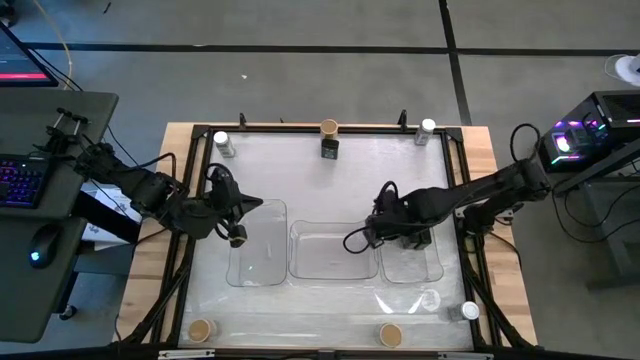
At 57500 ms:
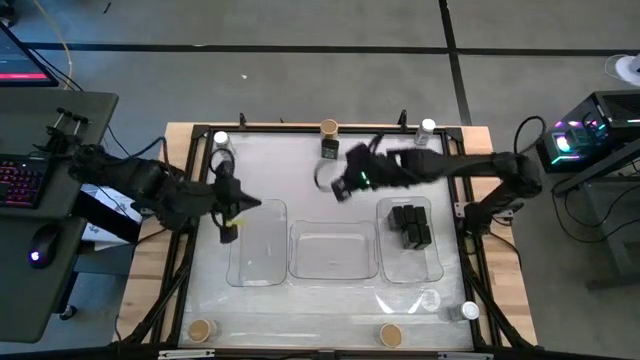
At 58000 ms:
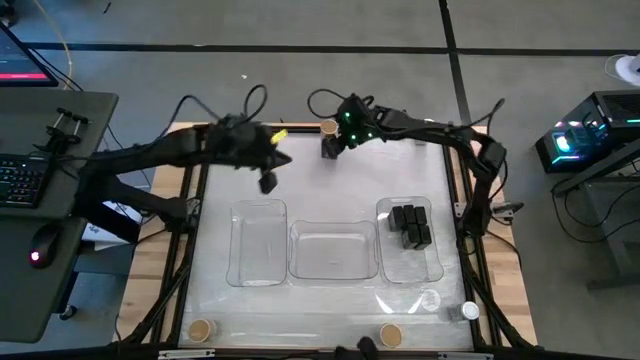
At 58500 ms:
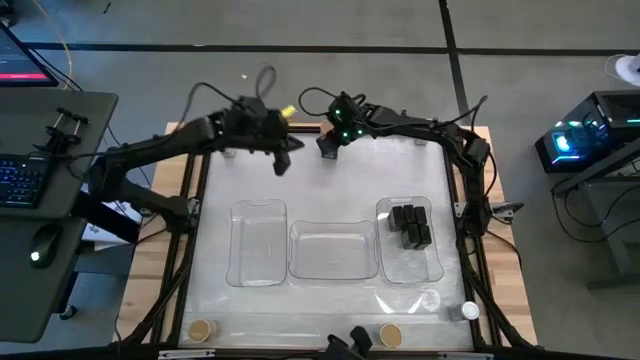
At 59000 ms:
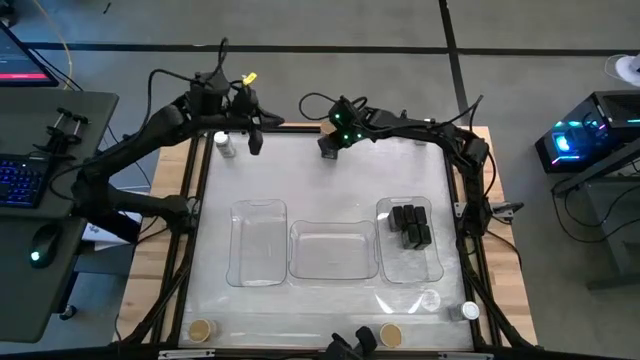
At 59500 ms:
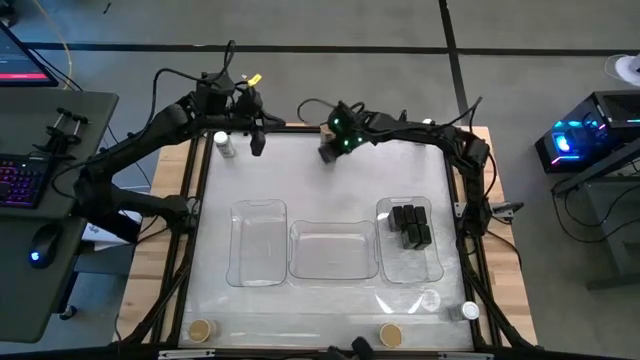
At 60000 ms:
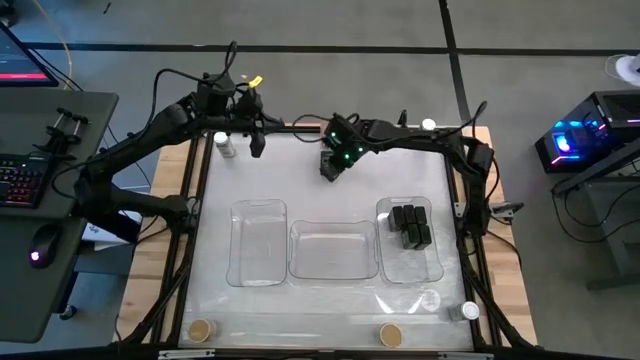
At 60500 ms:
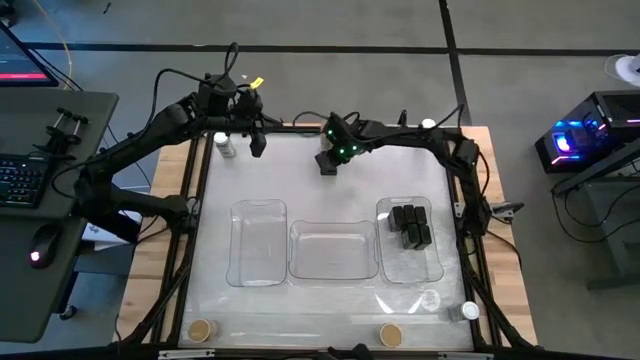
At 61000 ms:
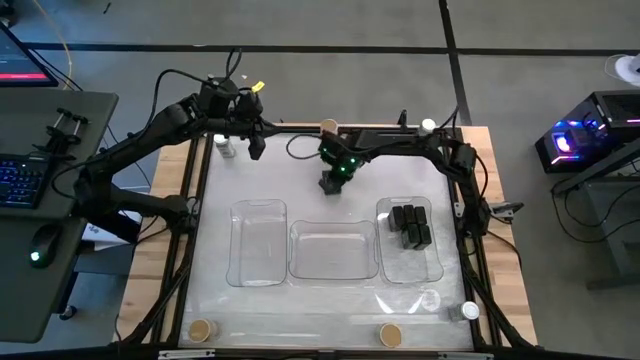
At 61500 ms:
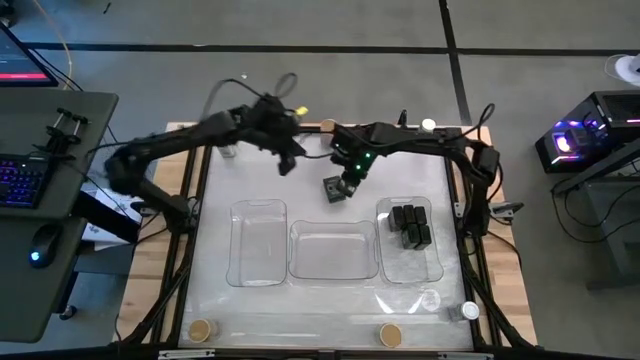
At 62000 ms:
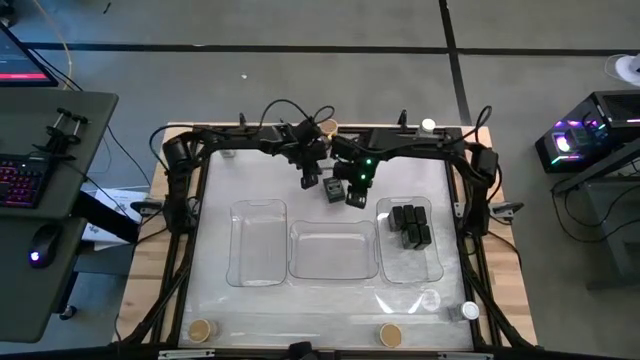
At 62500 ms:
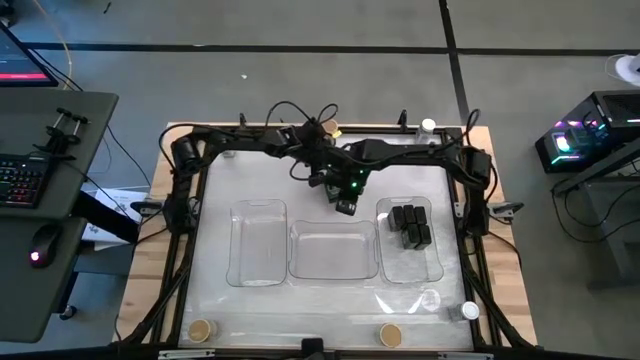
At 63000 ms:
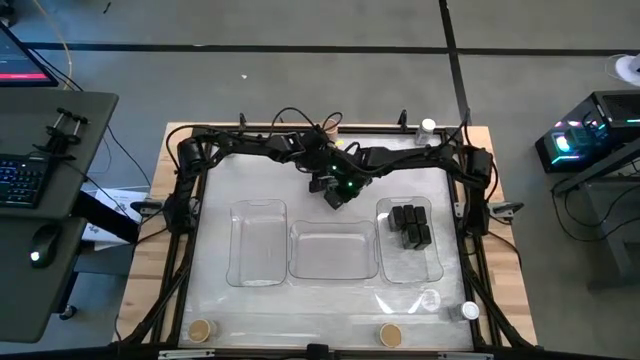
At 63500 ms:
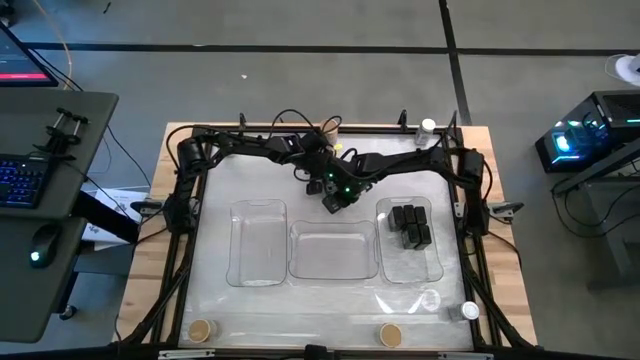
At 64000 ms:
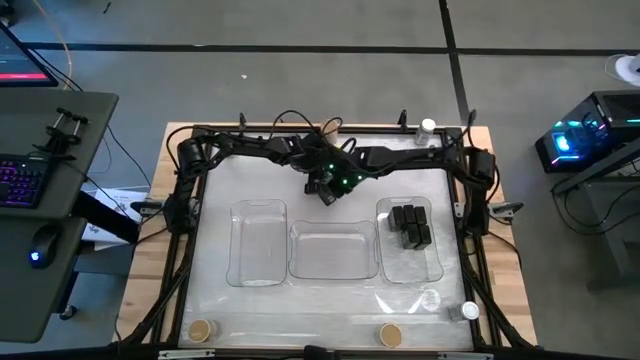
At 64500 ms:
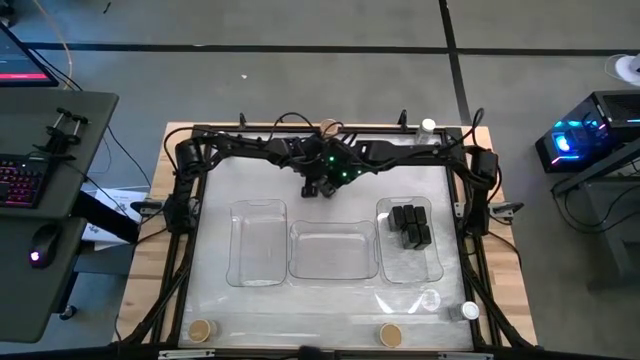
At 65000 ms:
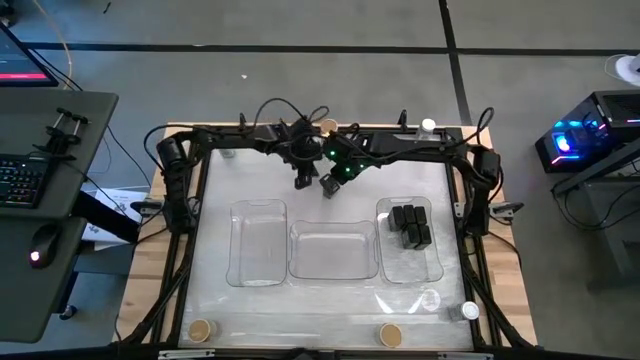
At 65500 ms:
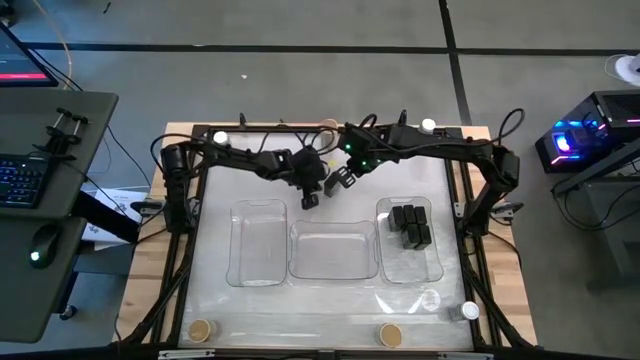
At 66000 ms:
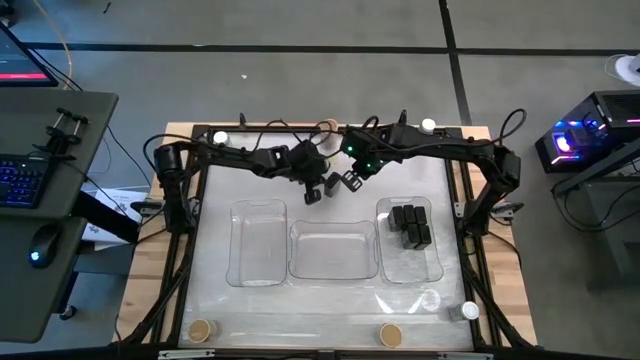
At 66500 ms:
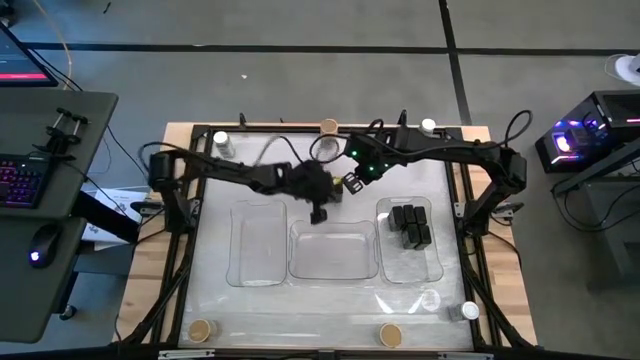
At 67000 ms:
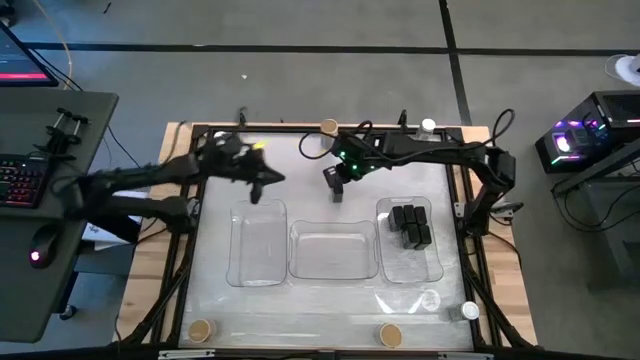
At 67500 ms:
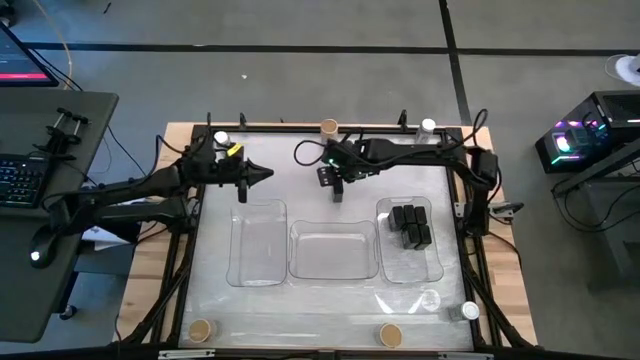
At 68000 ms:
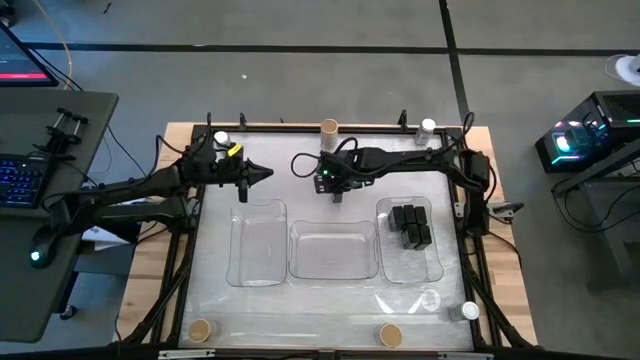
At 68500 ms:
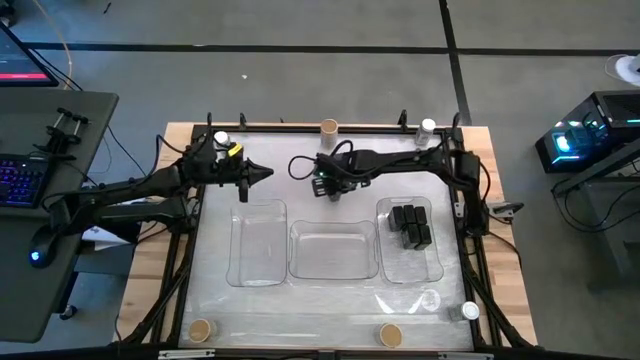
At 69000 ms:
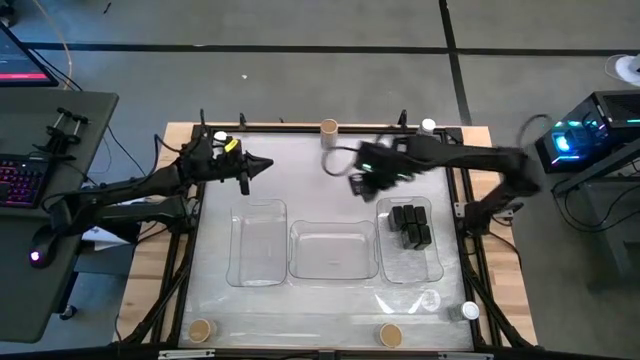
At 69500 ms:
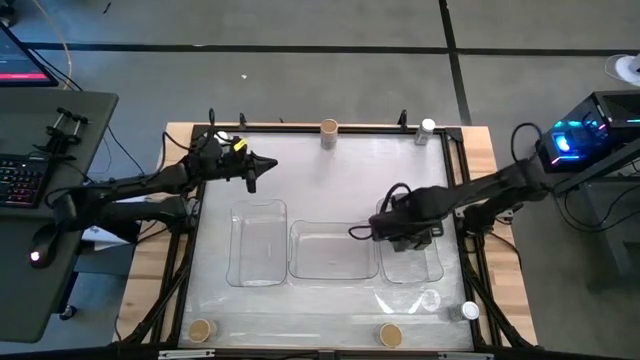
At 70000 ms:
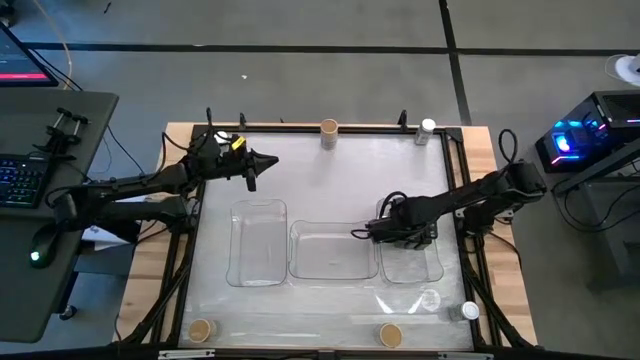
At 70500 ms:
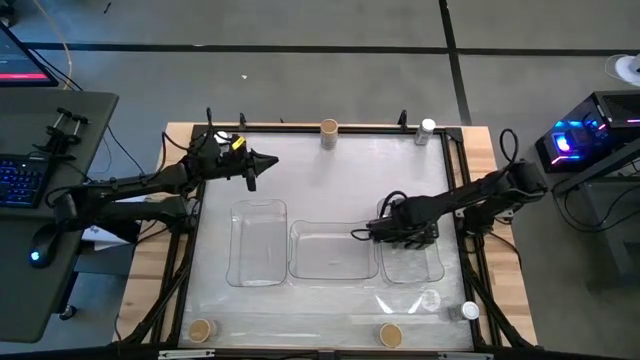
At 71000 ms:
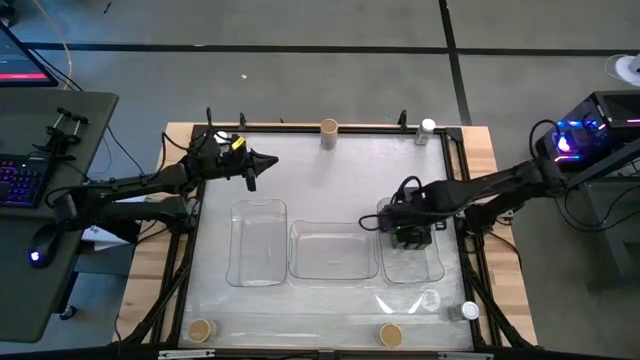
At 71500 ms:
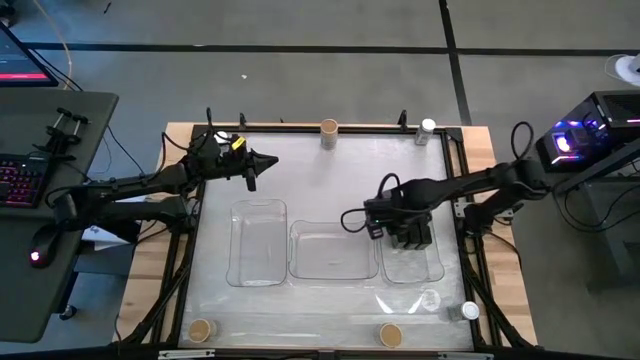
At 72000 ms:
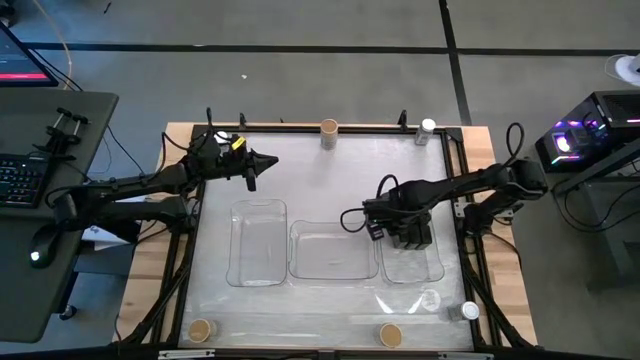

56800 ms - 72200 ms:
Task: Sort spices by type
Put the black seasoning can into the right transparent bin aligned with the other black seasoning cans

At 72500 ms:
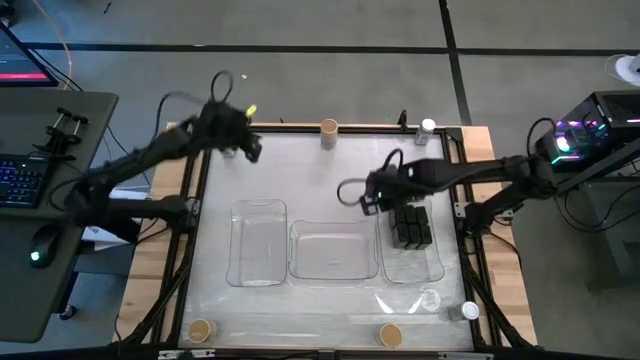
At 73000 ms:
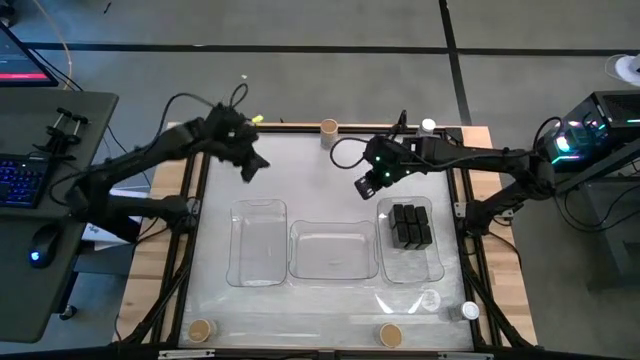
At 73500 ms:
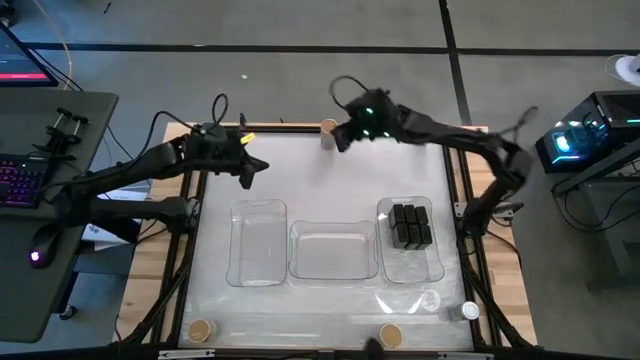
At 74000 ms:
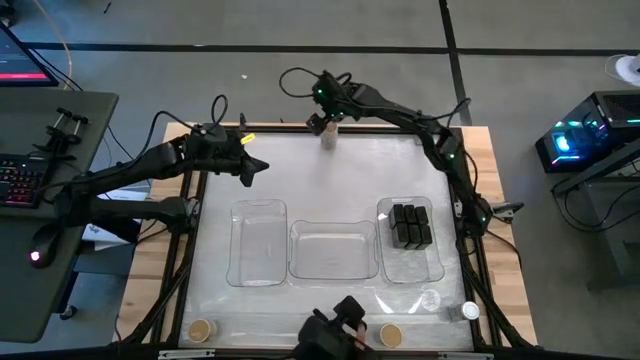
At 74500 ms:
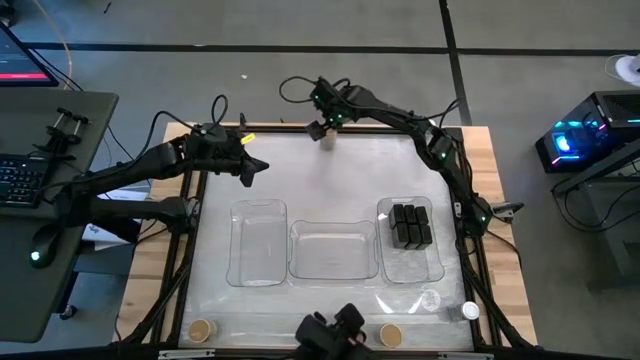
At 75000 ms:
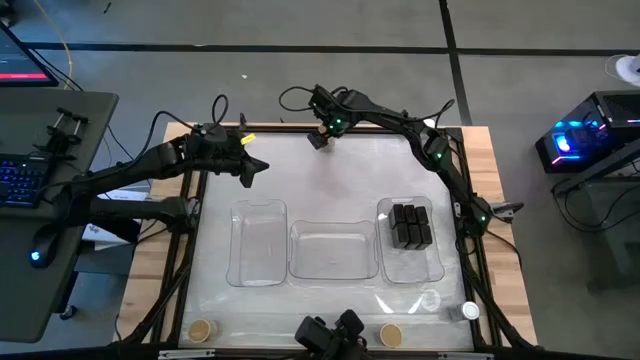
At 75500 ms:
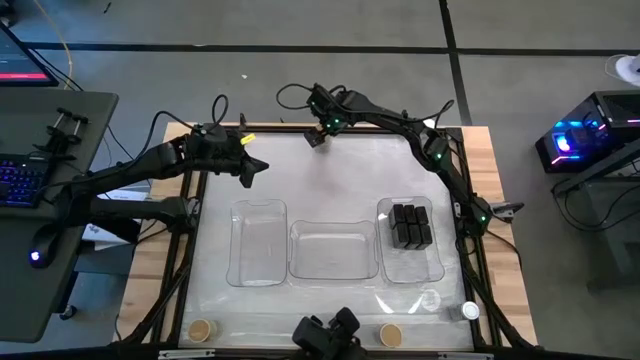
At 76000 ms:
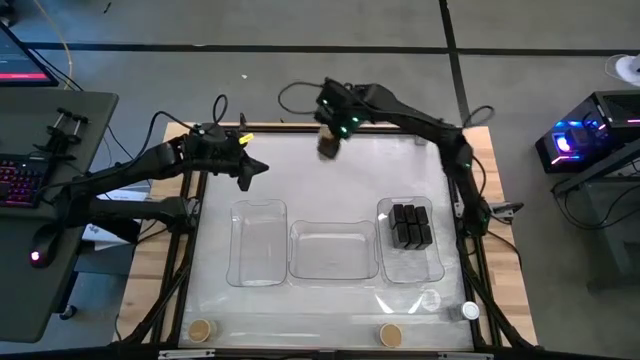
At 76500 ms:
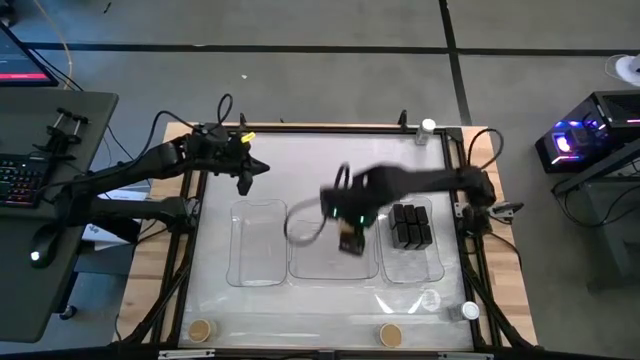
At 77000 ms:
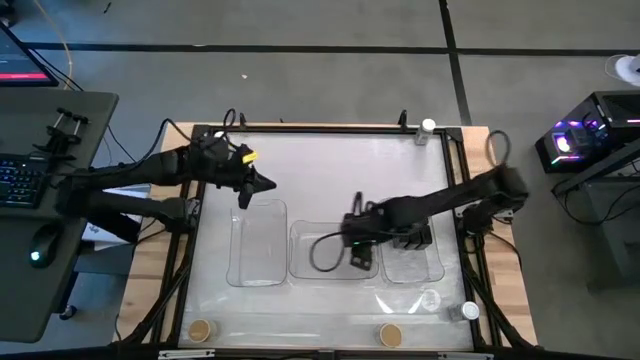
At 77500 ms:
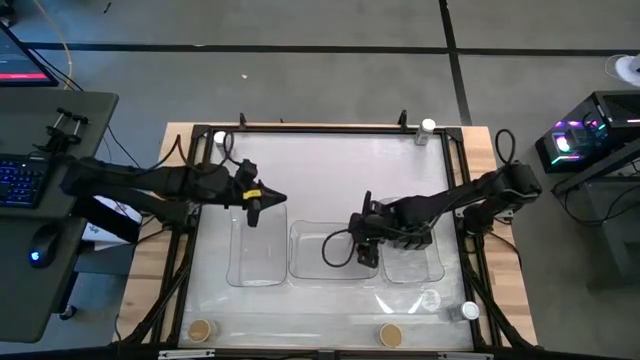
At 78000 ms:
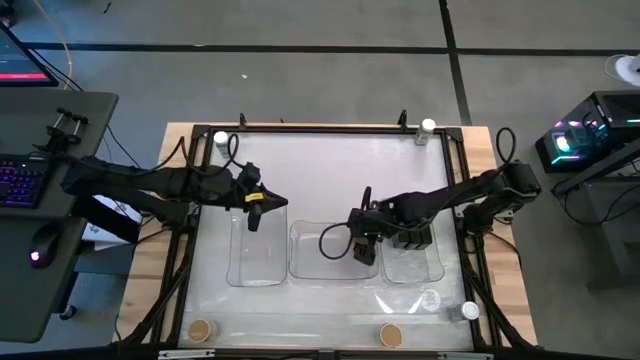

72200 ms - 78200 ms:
Put the golden seasoning bottle into the middle transparent bin

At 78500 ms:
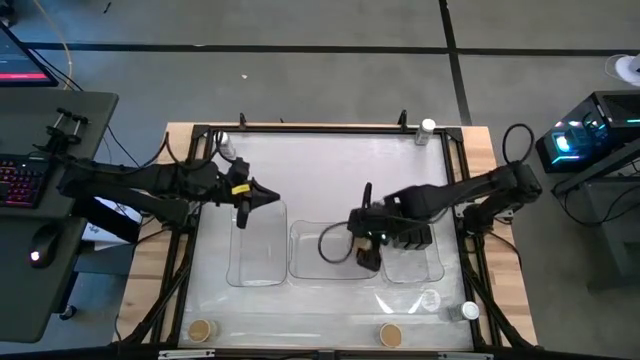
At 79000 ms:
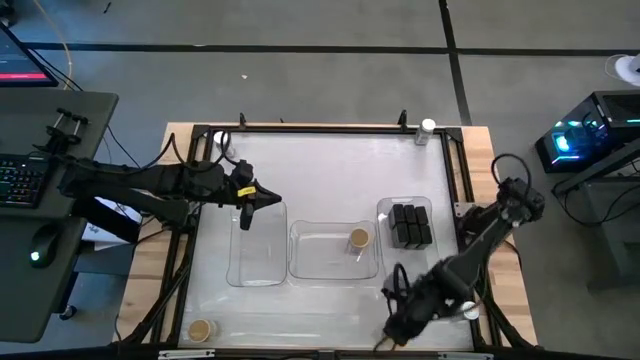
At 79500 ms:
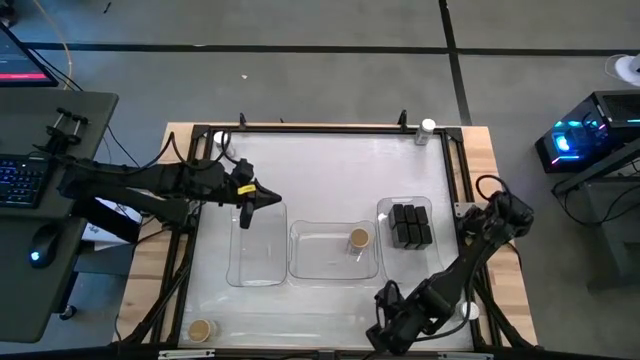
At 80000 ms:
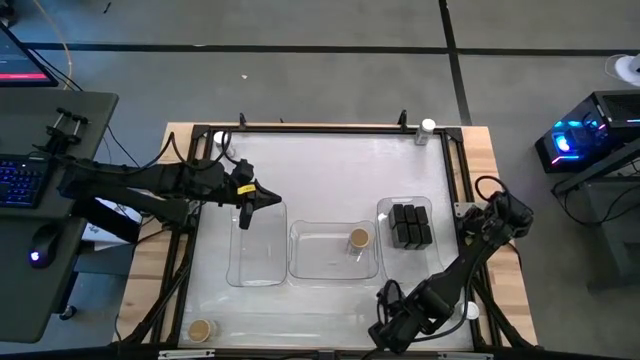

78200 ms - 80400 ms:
Put the golden seasoning bottle into the middle transparent bin
